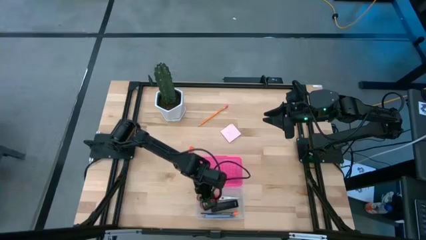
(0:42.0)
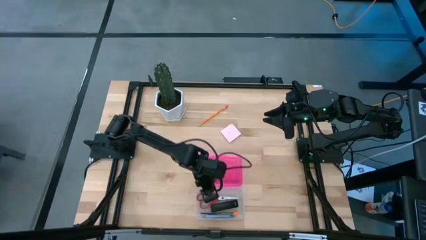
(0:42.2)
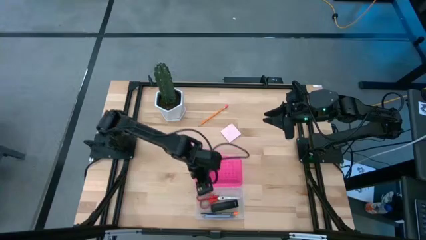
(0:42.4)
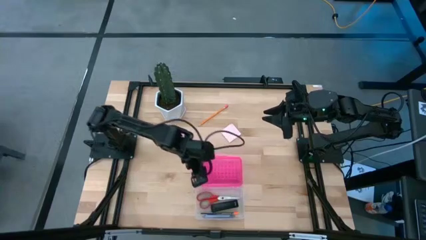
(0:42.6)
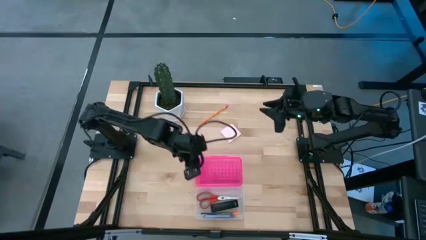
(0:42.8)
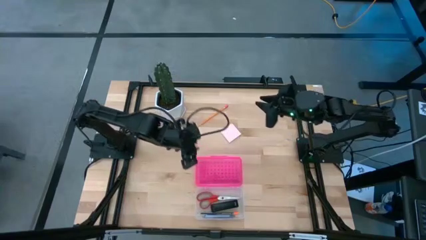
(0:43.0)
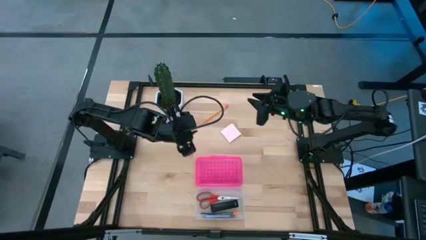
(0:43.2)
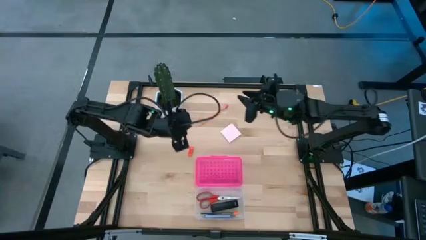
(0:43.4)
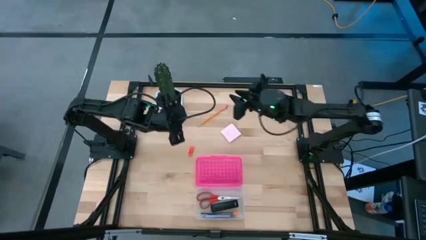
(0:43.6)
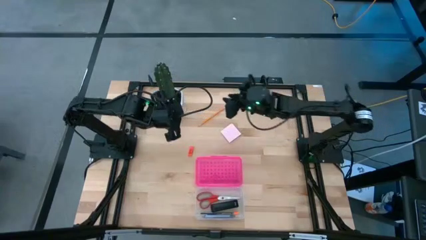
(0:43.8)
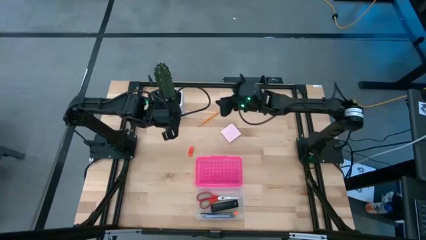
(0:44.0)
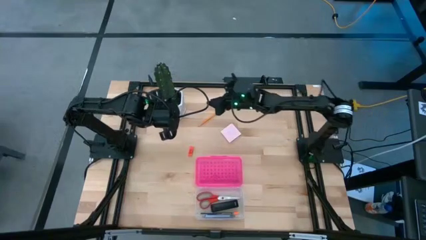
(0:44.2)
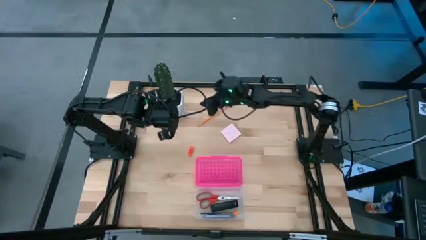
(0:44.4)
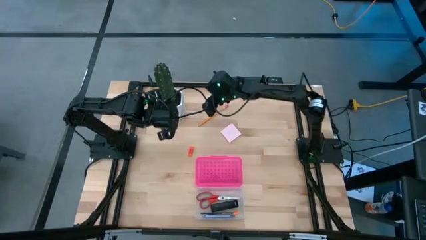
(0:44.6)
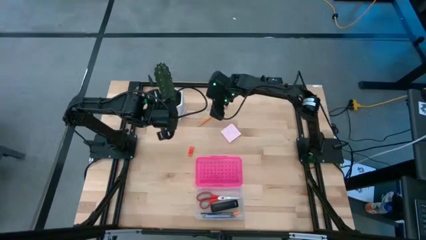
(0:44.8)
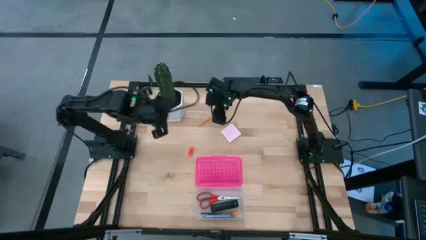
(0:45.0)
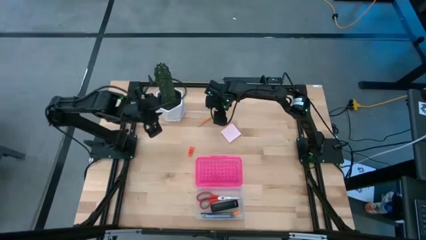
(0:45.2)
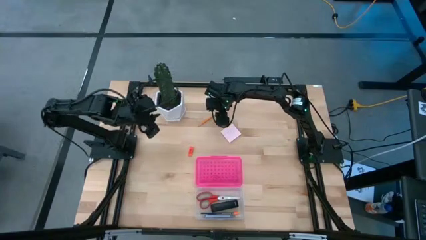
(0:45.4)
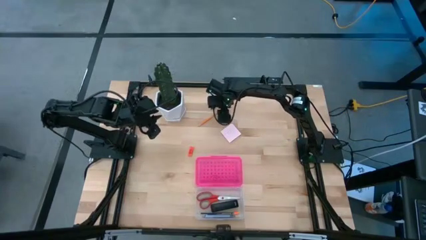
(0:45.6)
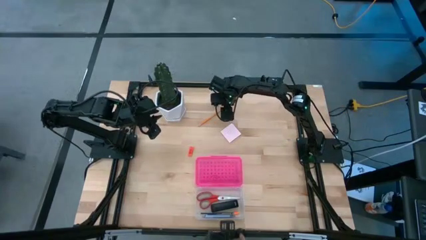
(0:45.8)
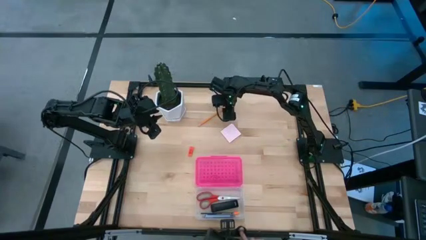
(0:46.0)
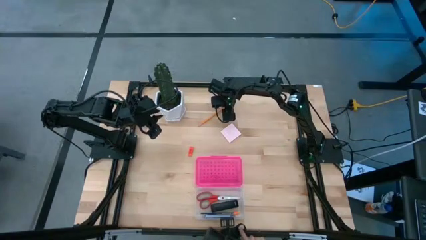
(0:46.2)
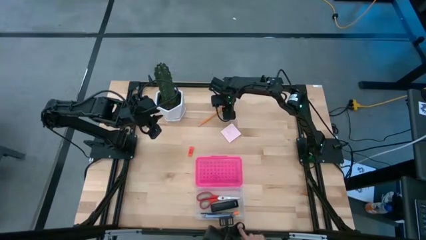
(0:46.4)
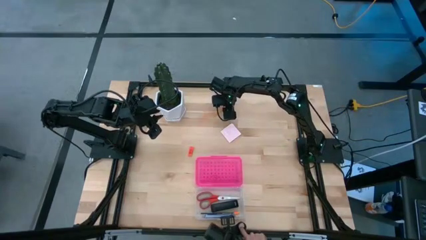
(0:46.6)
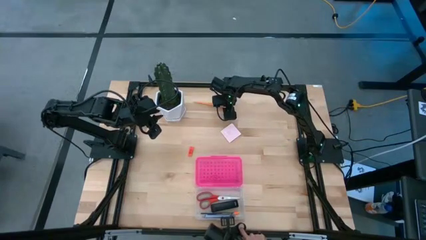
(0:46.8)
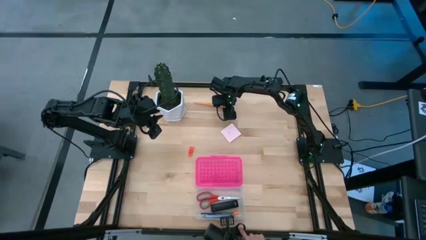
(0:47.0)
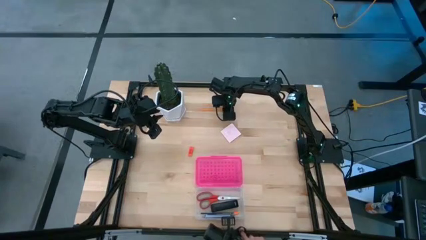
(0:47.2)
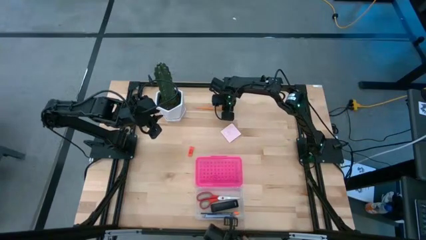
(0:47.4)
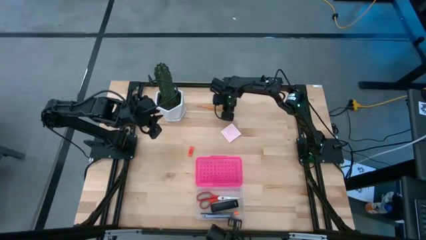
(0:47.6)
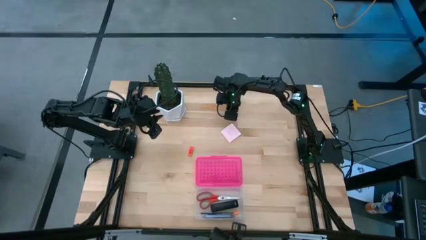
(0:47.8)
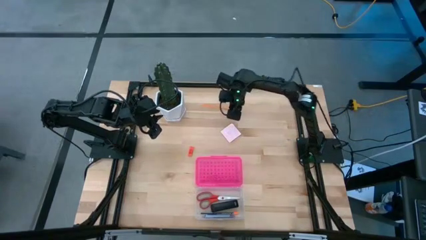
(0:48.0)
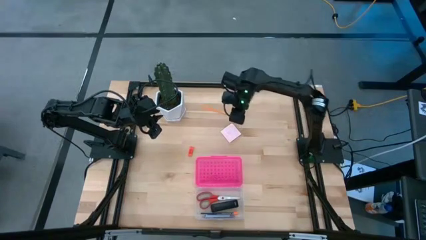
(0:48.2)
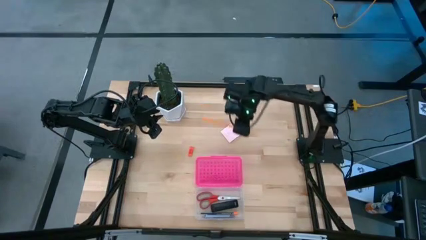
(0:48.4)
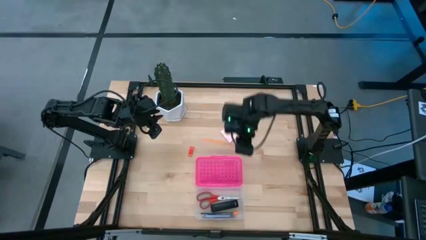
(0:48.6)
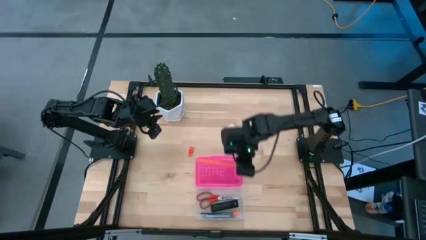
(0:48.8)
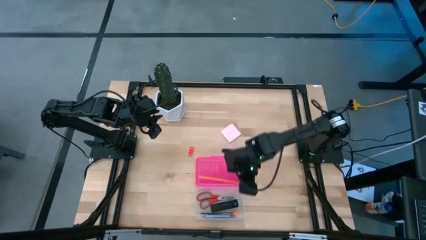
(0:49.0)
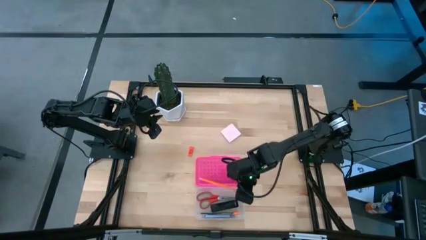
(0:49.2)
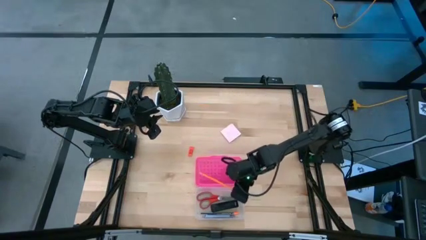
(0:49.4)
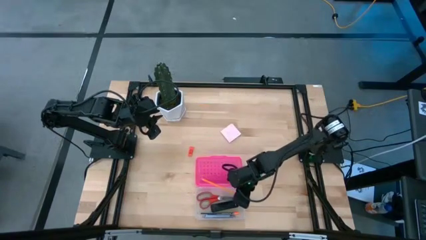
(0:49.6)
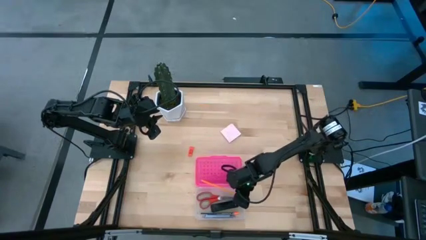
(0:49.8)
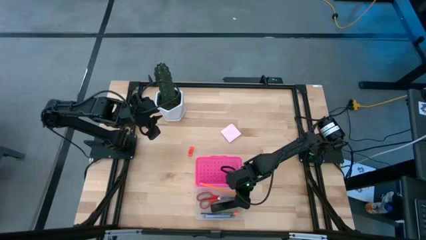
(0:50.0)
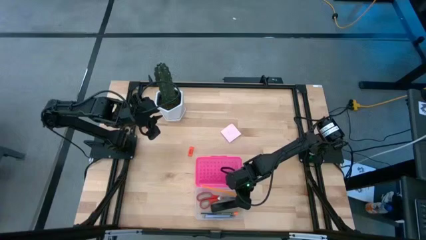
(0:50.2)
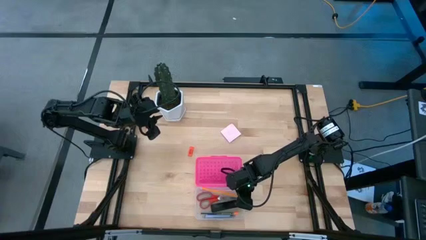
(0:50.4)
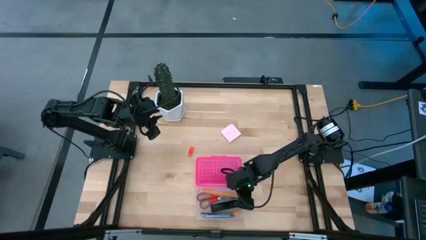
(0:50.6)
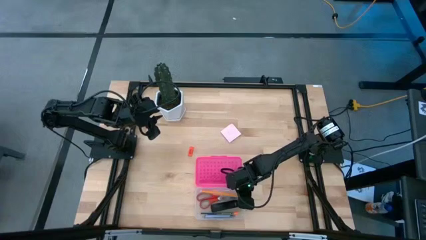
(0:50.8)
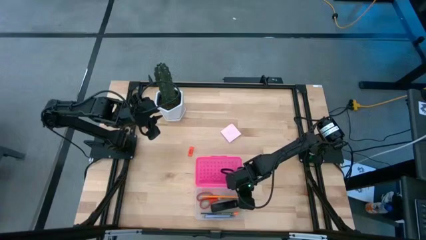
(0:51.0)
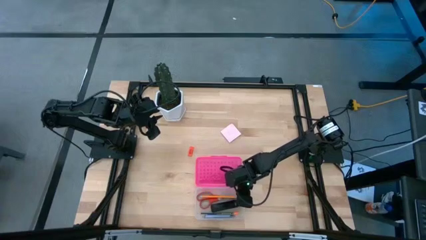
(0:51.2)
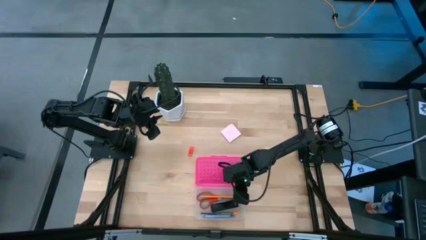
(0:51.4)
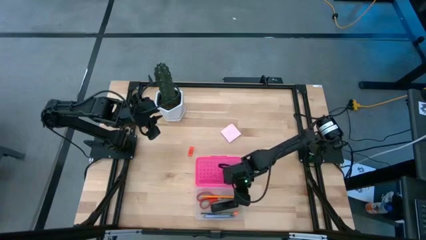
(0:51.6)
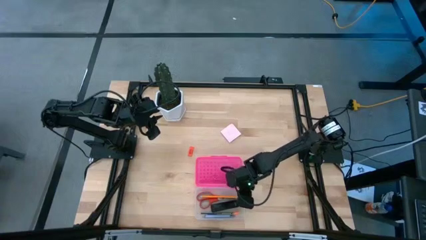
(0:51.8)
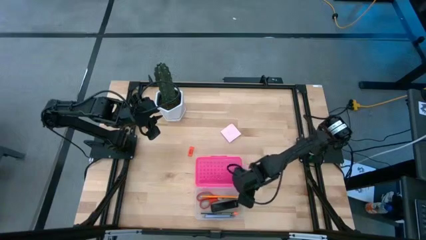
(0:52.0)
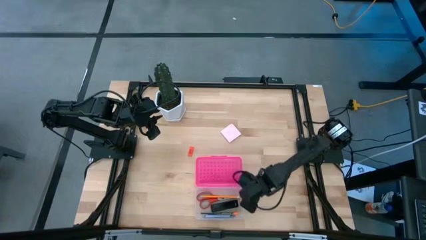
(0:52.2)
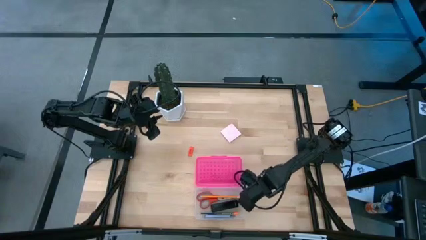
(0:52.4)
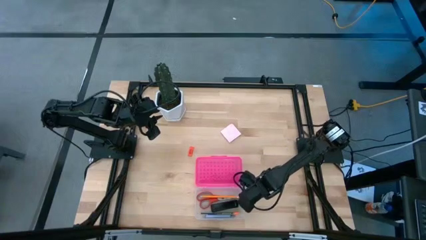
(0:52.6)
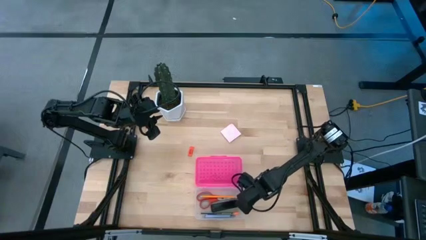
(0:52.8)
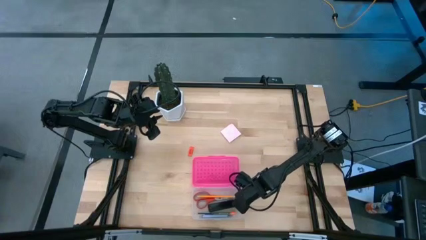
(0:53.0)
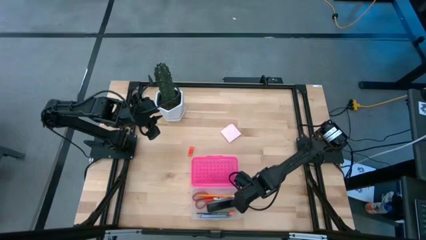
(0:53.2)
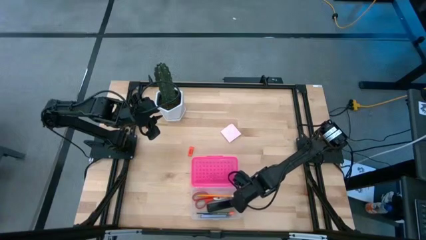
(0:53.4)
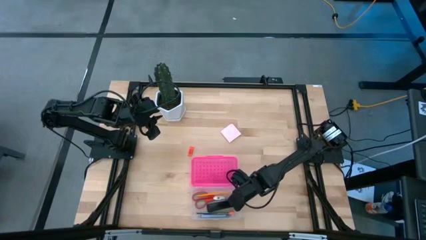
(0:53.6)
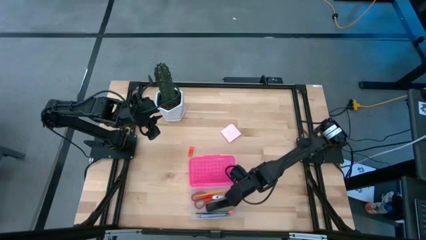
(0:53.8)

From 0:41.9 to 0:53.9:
Task: Pack school essentials
Put the yellow pencil into the pencil case
